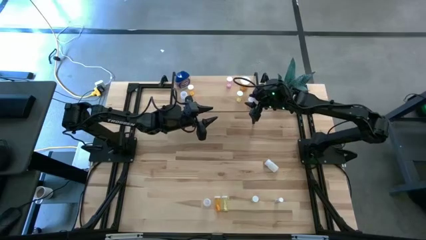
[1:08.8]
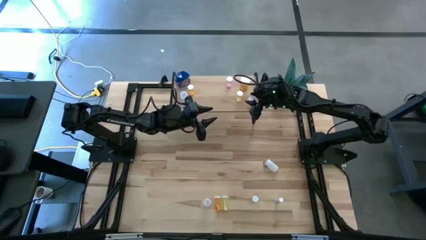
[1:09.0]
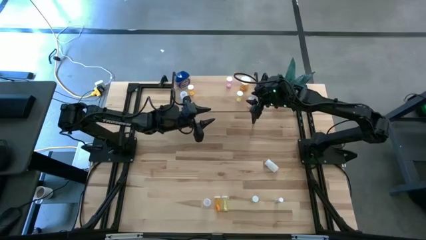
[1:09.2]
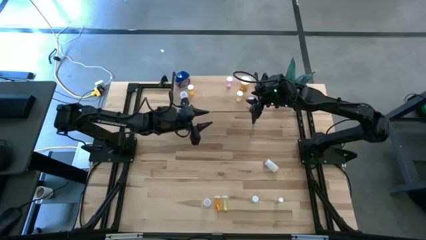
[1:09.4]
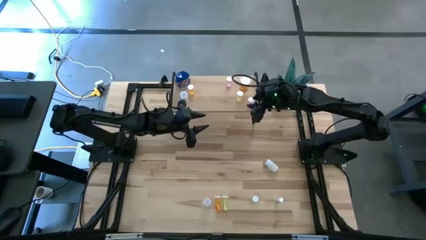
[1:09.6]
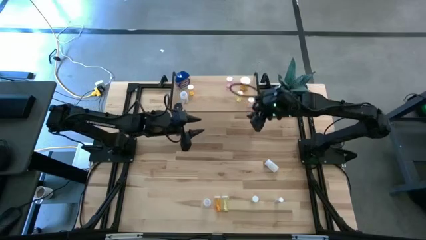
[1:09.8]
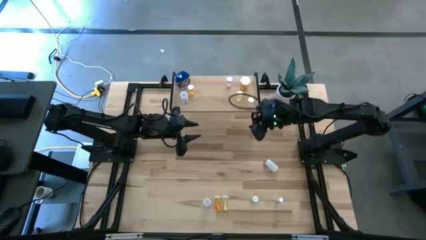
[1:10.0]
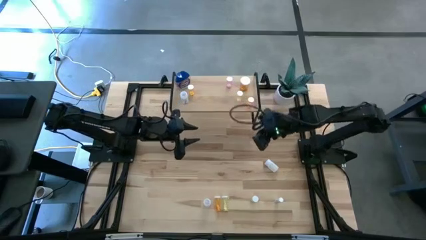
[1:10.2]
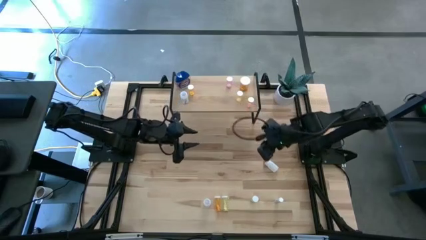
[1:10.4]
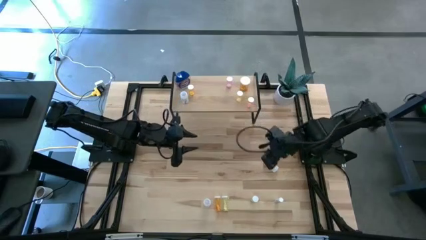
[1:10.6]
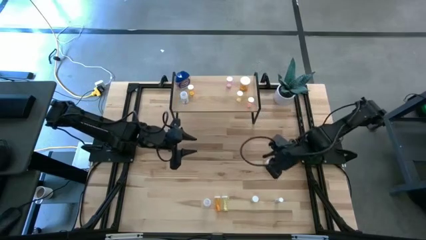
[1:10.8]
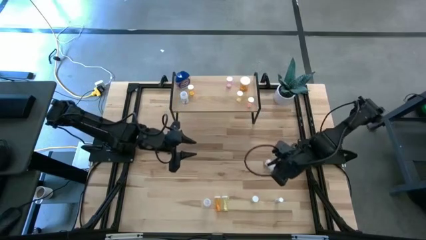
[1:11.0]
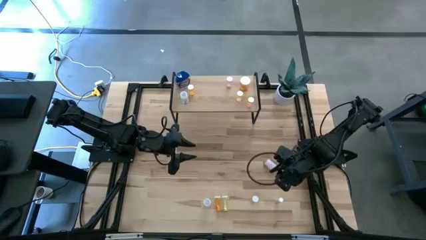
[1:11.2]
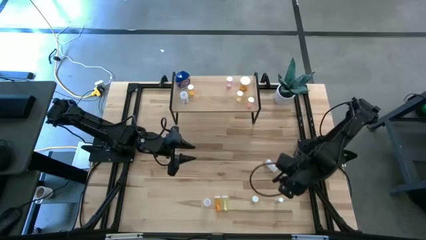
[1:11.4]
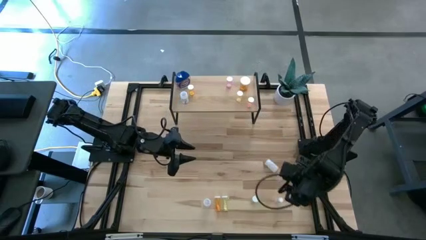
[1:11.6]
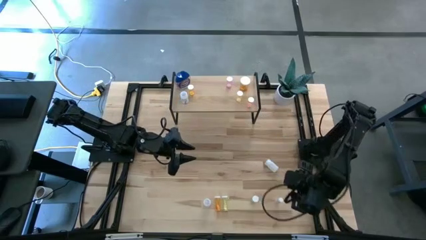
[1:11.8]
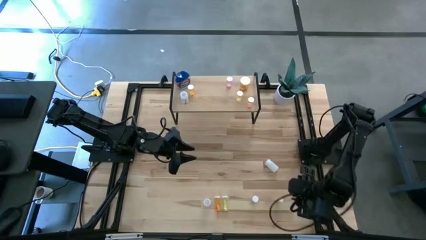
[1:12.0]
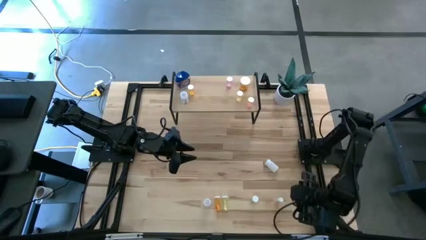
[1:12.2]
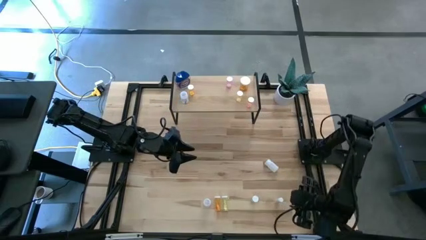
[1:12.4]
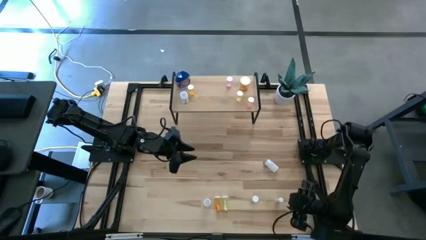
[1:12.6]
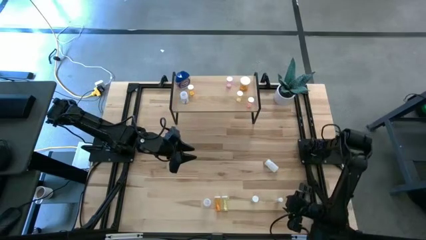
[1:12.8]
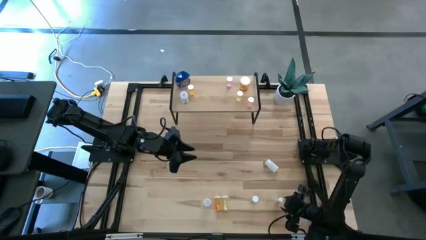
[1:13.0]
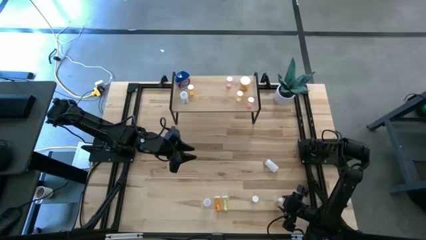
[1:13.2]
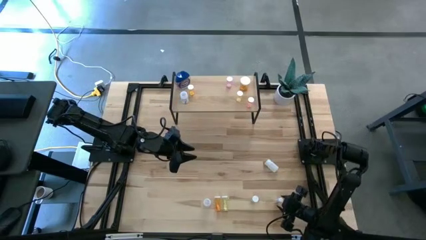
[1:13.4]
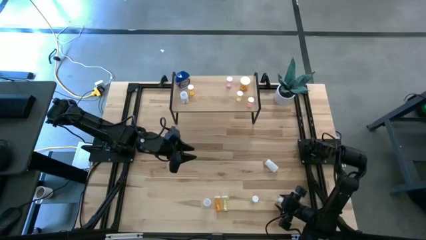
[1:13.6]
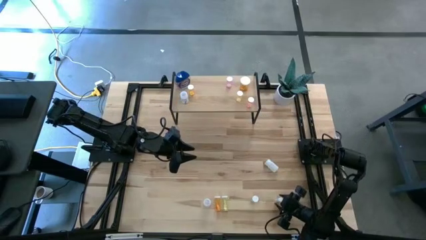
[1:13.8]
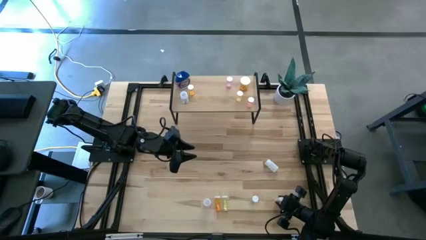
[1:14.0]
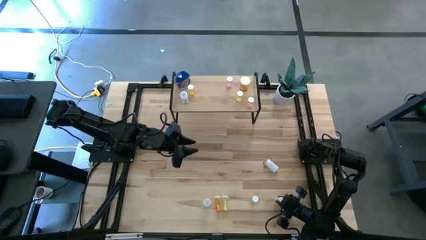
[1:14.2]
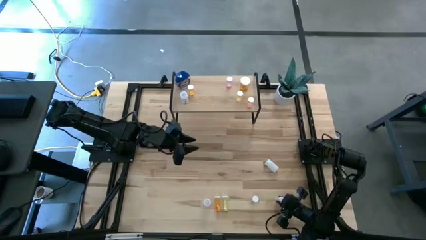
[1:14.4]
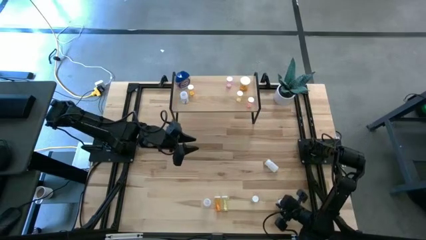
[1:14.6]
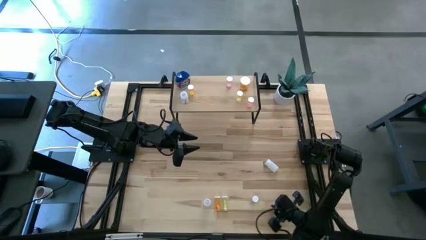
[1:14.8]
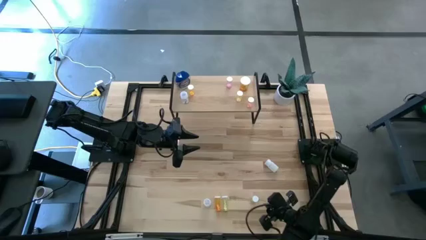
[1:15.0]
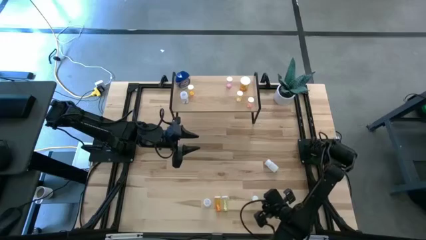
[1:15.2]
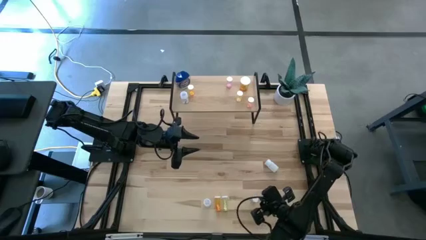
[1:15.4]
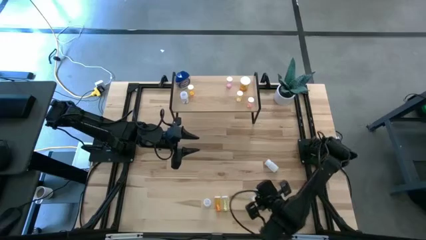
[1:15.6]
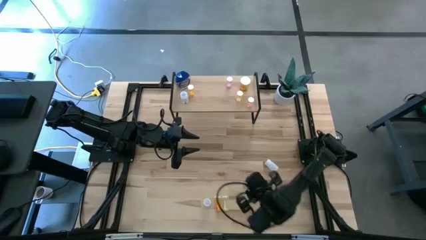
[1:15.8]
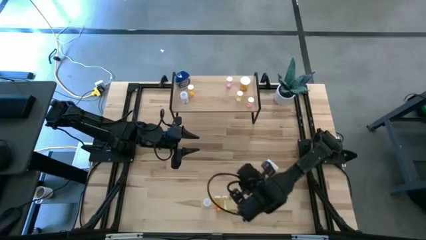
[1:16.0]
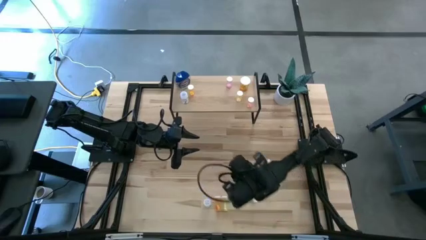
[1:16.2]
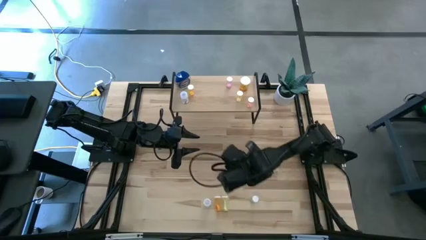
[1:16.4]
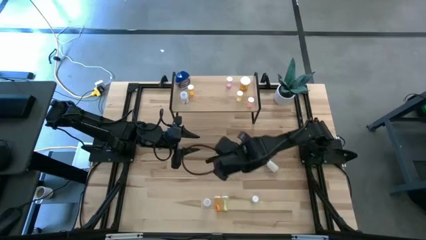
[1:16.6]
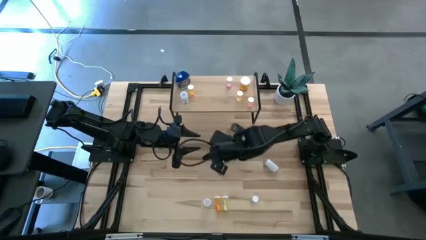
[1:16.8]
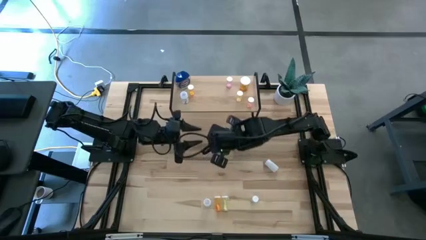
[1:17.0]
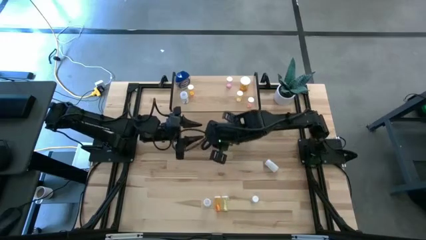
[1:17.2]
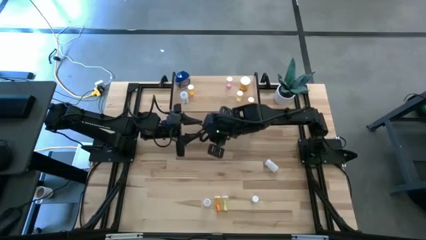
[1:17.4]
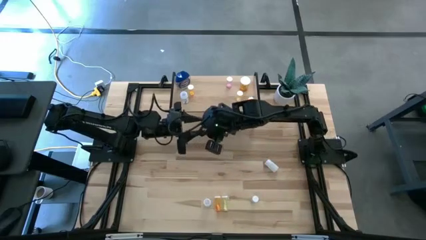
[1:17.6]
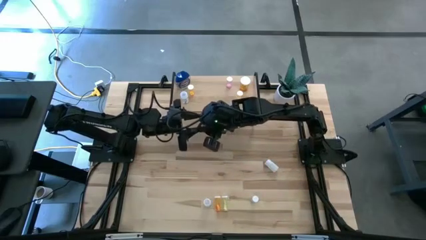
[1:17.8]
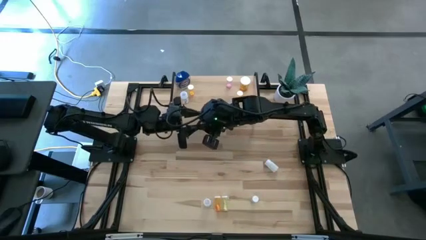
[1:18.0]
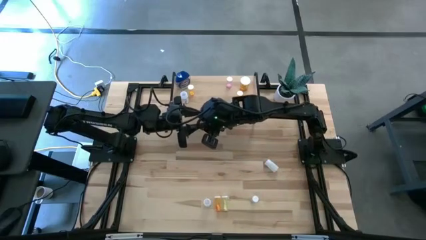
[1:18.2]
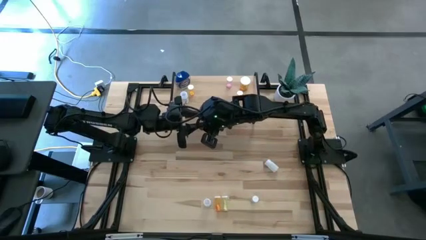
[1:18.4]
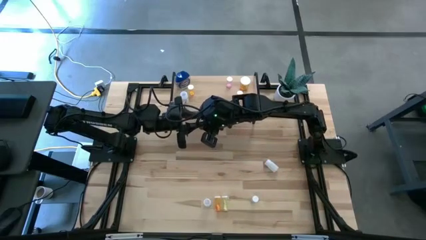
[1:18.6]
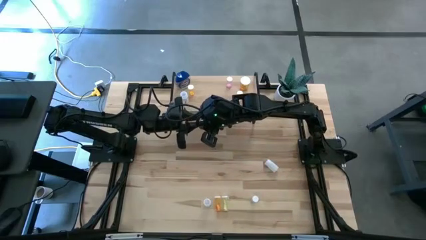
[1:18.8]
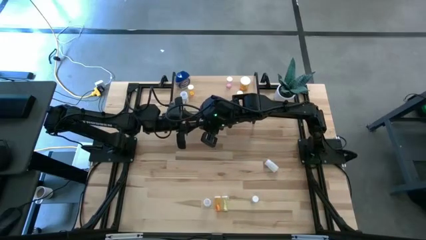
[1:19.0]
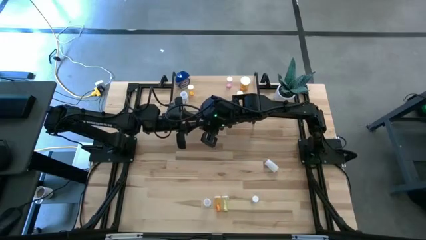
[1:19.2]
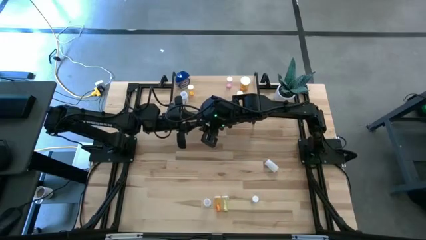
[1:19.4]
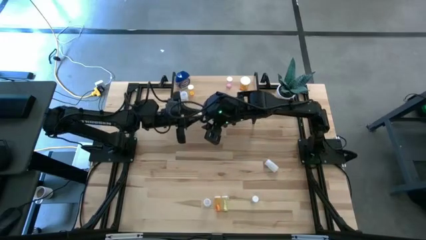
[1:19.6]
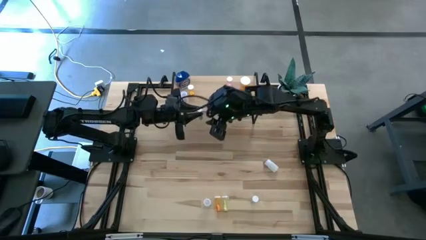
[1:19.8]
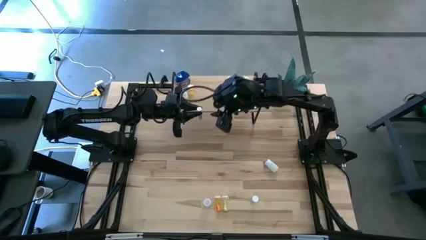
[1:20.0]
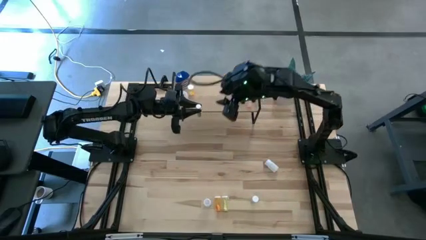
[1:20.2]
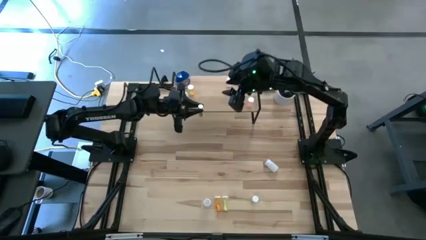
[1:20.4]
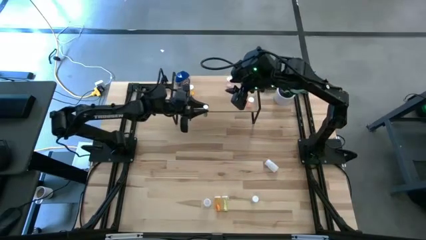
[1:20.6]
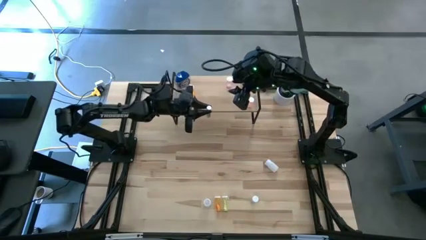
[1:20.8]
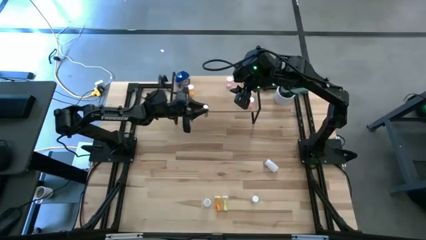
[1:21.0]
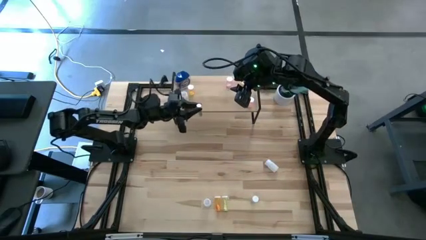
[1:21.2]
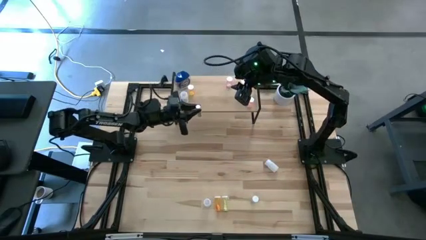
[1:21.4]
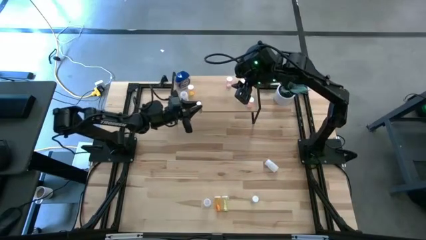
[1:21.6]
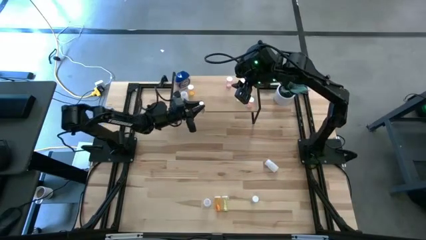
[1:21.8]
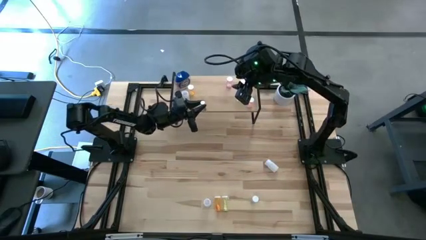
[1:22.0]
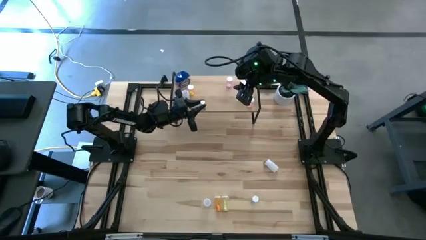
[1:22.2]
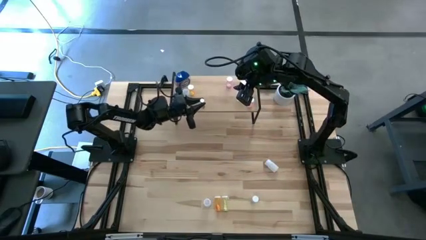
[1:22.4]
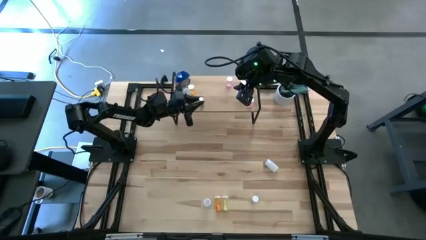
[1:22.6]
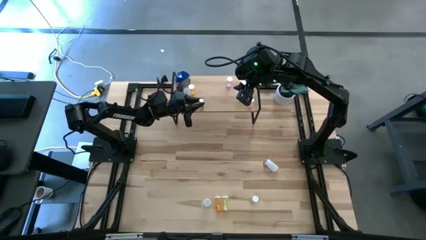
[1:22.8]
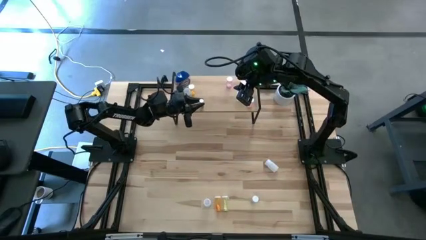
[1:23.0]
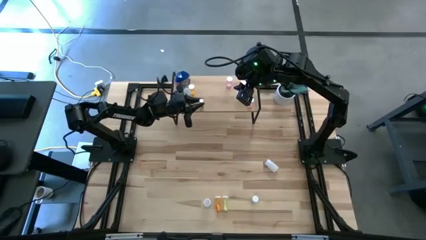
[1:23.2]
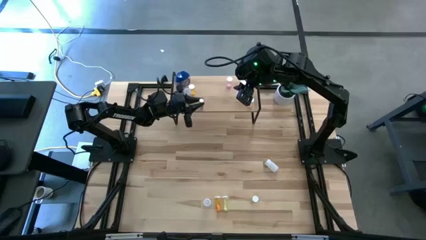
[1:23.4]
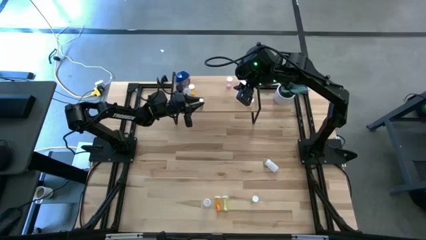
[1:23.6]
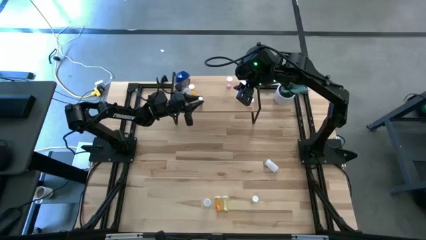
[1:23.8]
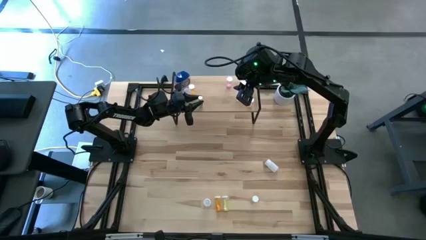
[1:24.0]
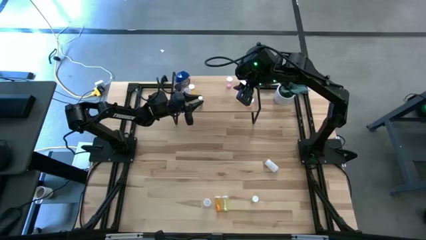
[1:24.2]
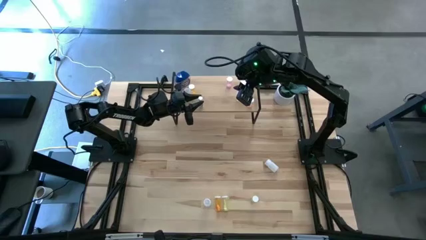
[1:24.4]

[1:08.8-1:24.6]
Task: Pick and place medicine bottles onto shelf by color
Put the small white pill bottle on the shelf
